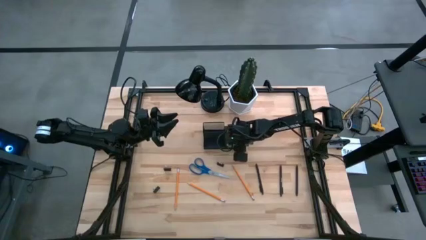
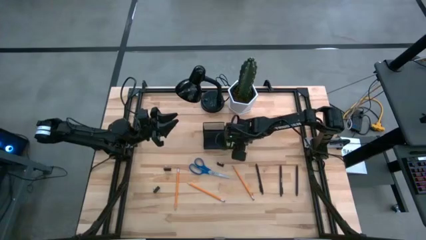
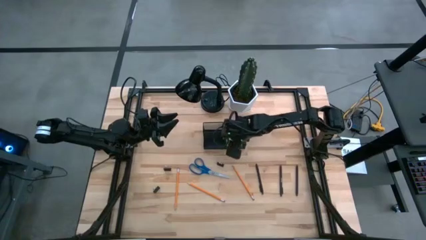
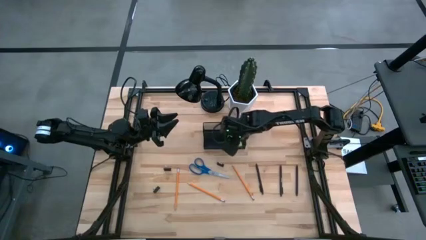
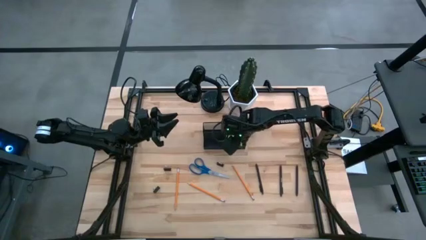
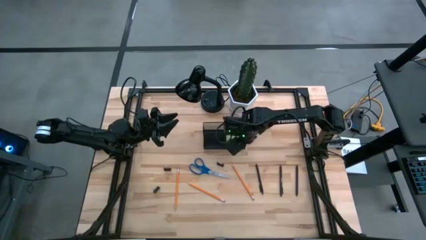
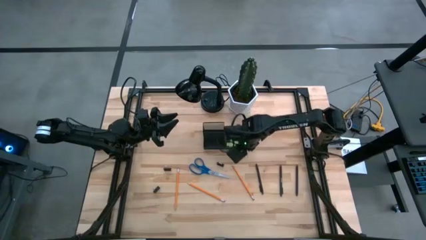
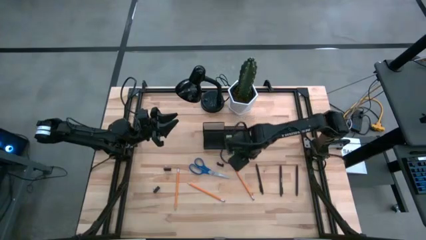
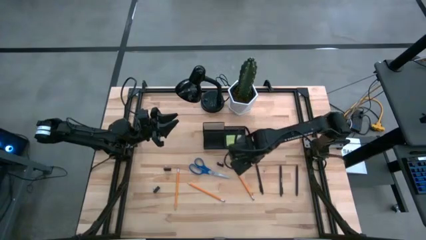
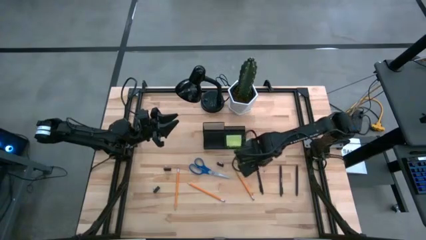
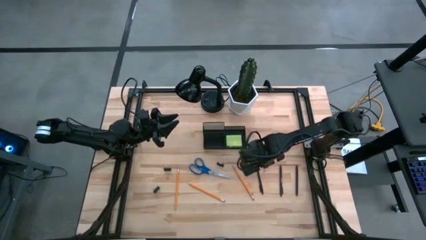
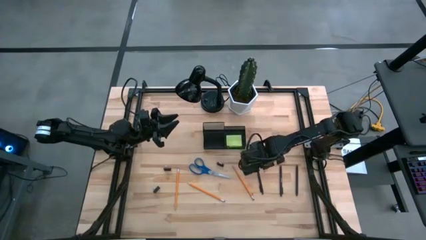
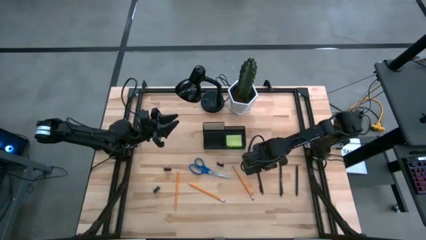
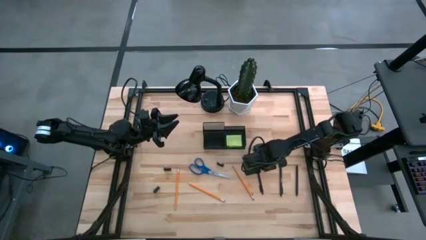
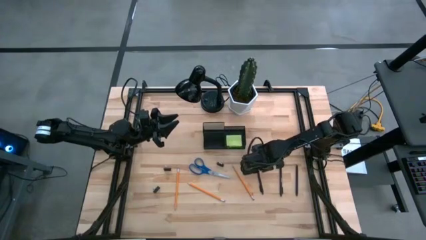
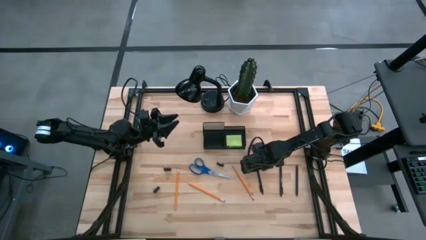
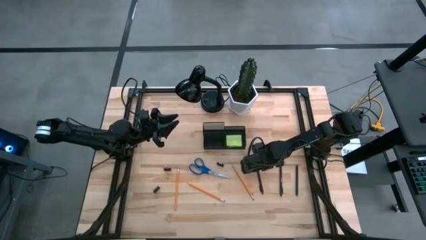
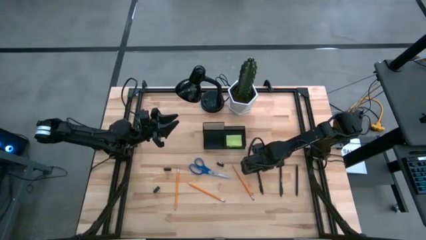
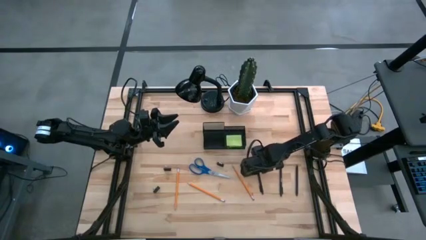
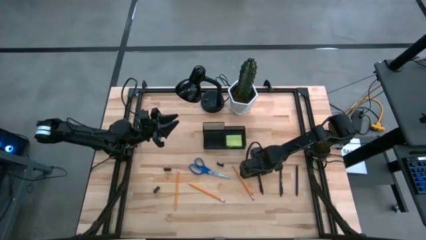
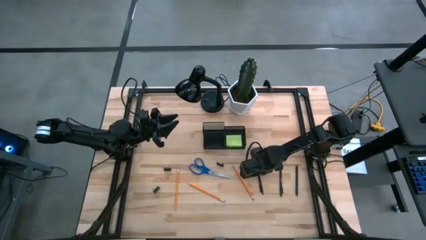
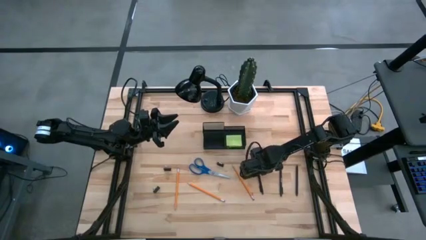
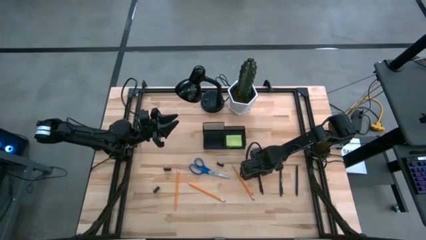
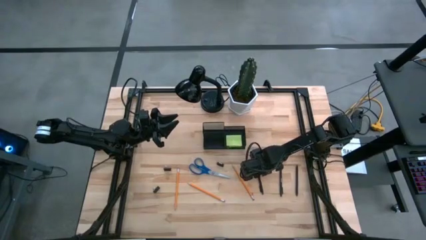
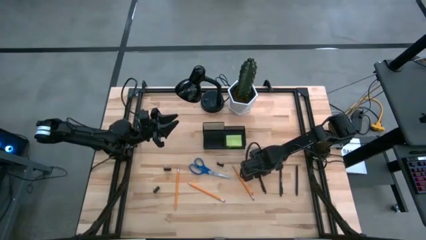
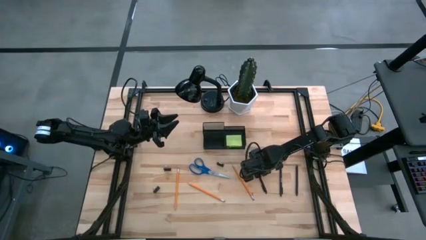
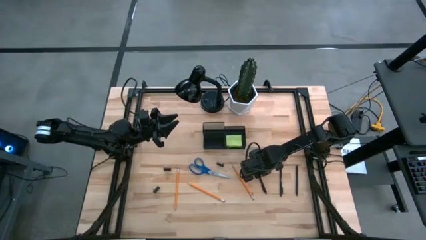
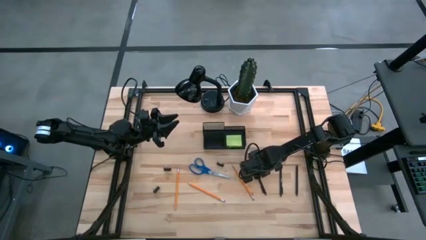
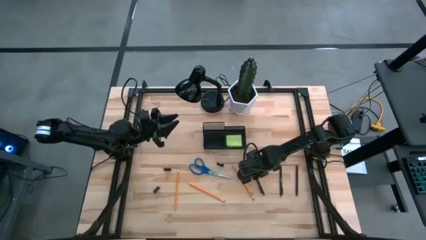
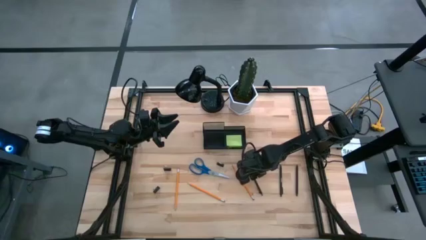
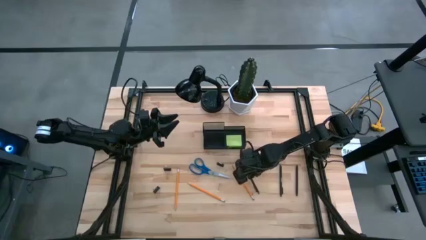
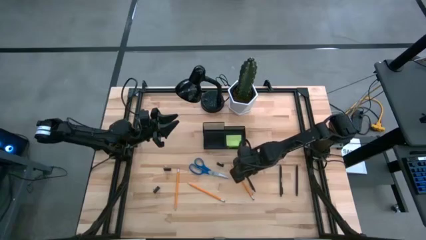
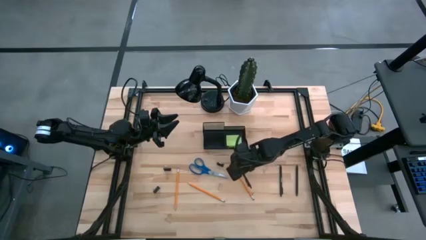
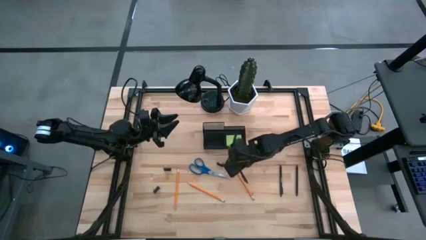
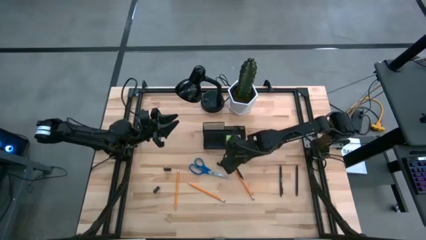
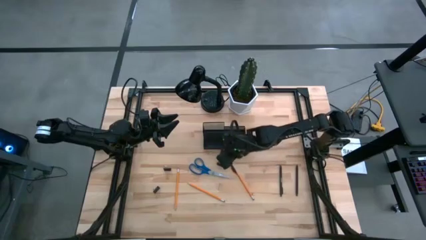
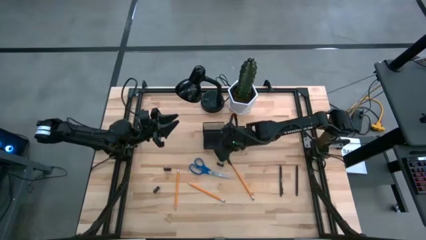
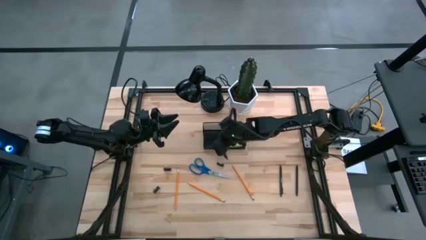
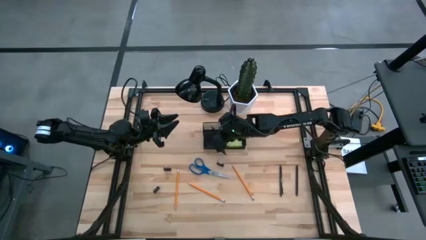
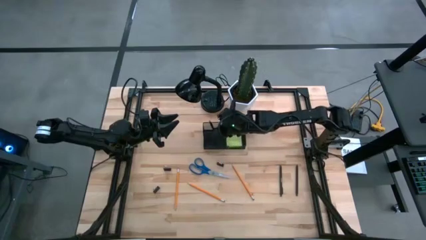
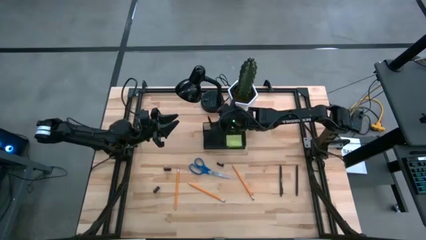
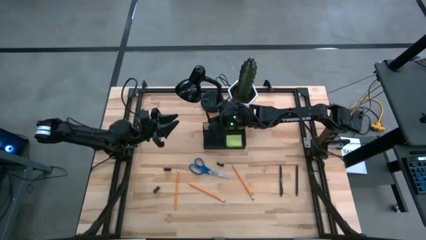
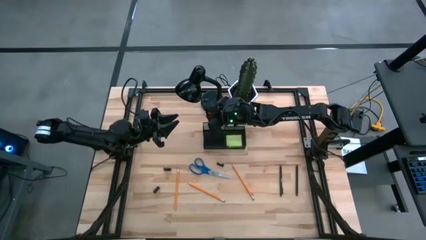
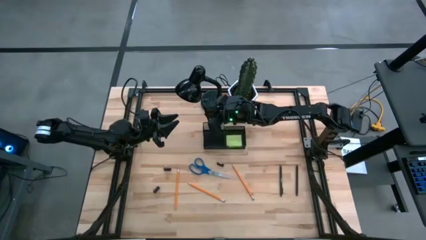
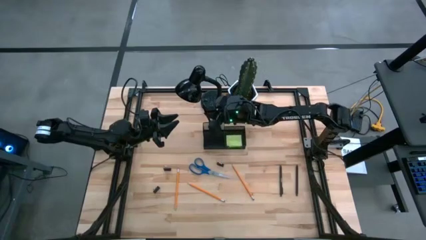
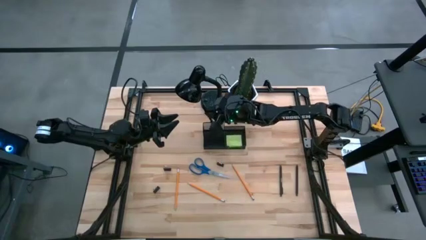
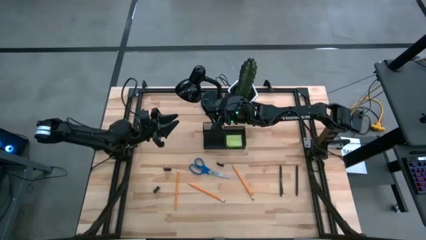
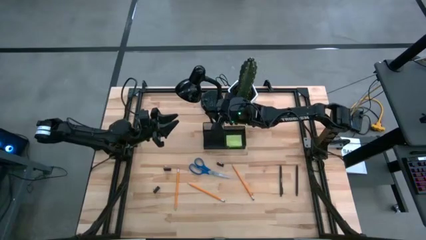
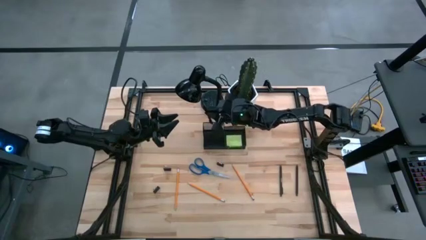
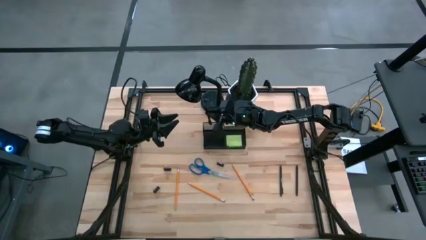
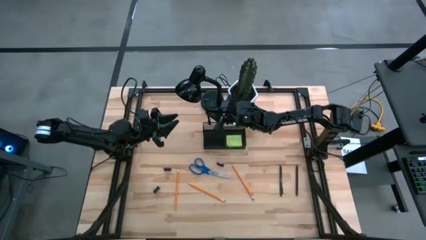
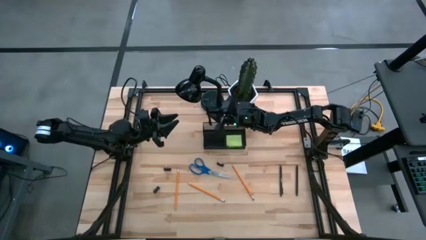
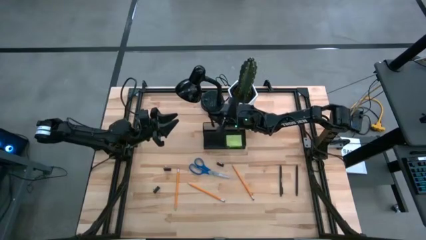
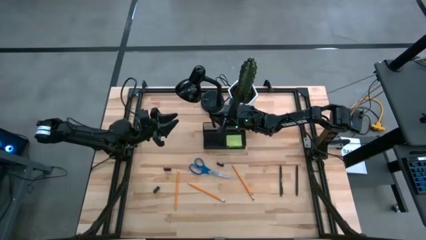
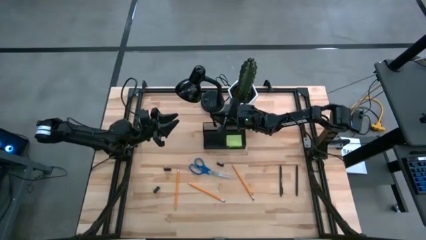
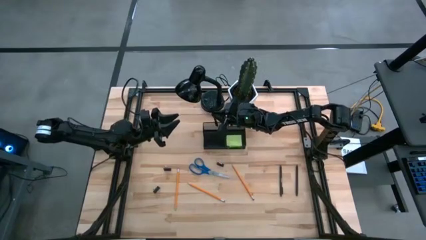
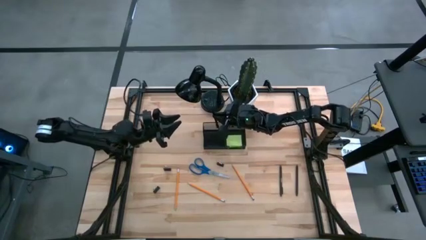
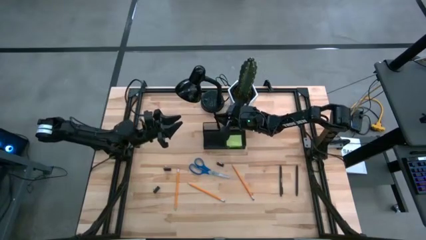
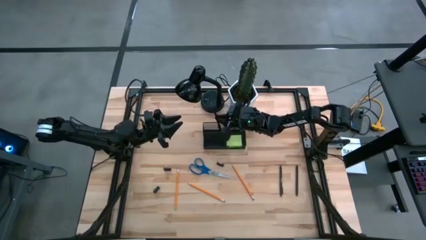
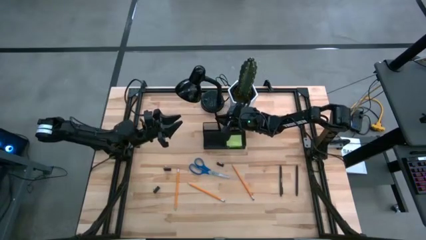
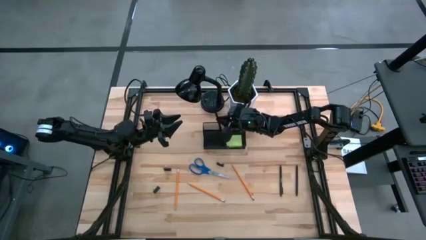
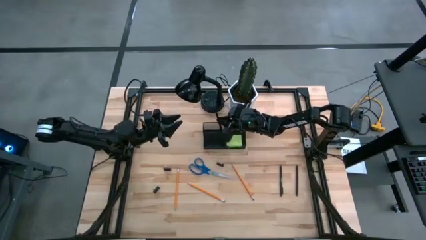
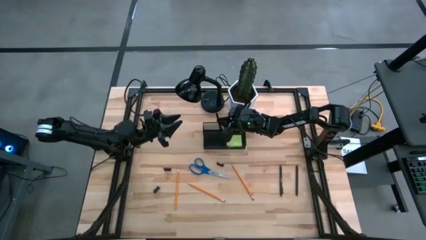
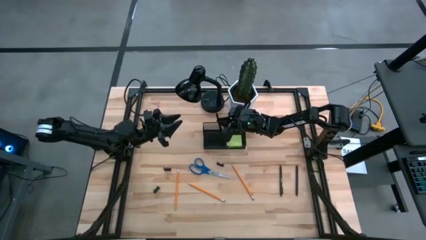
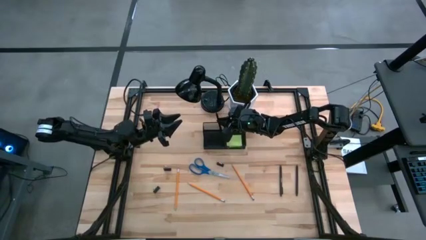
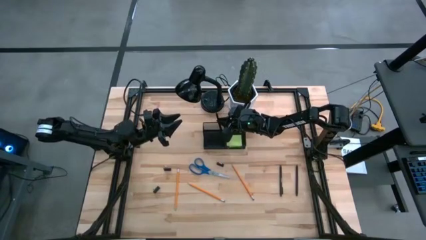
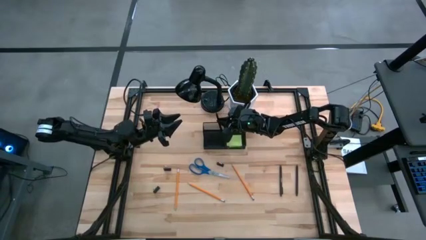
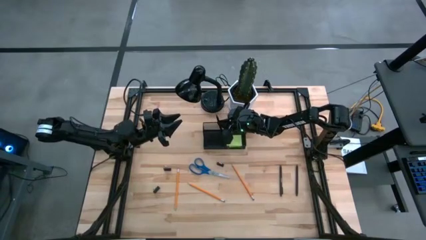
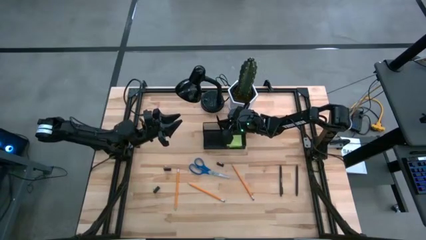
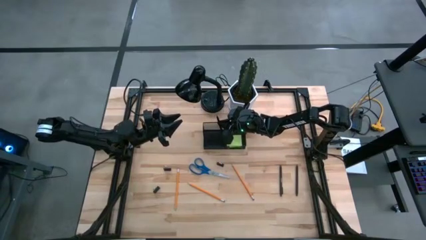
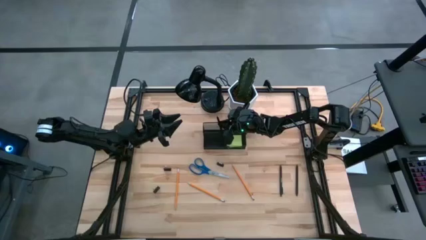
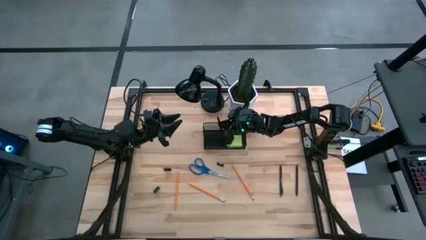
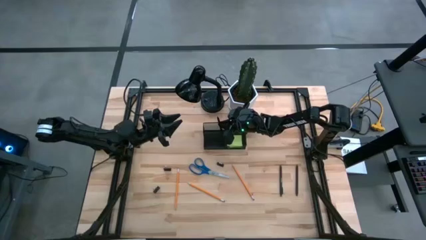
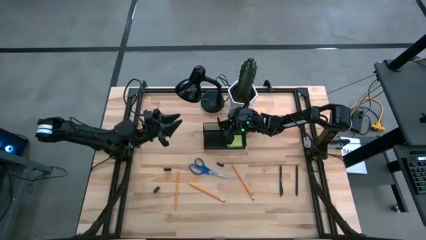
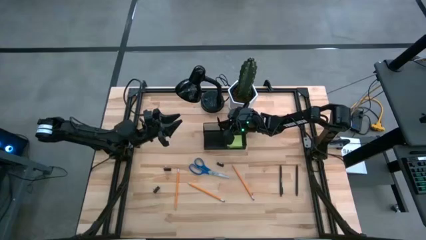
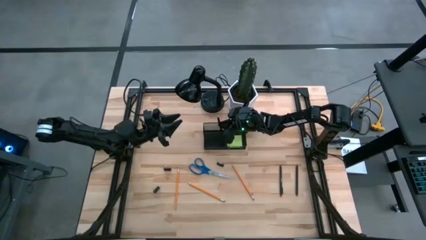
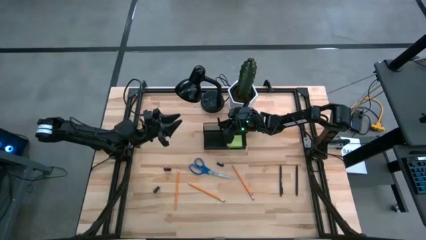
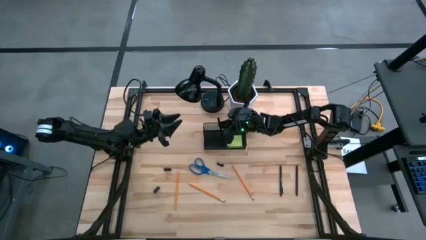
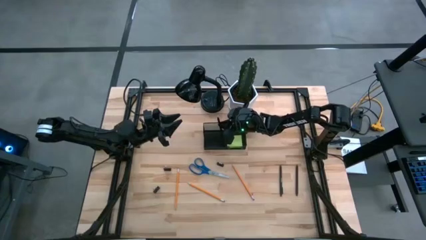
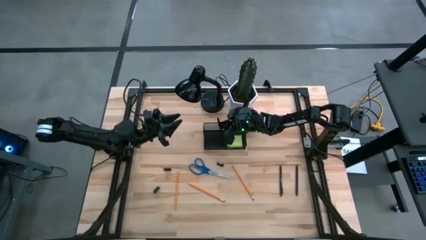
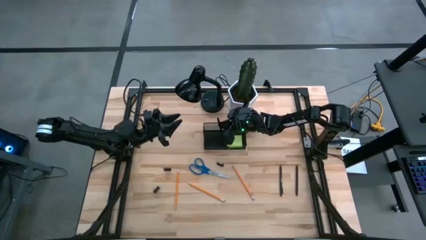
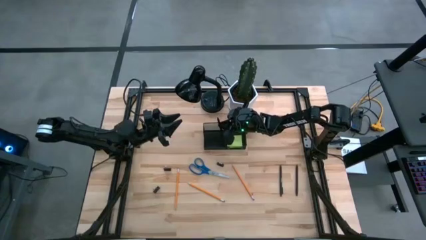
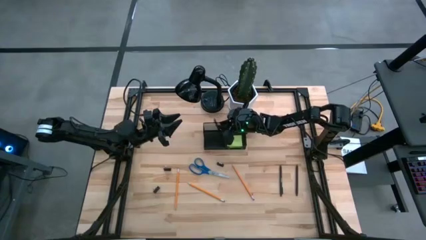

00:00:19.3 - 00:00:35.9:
Task: Pick and place office supplies into organizer
Put the left black pen into the mesh desk organizer
